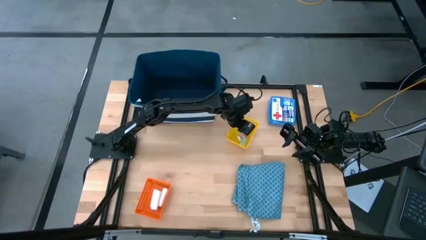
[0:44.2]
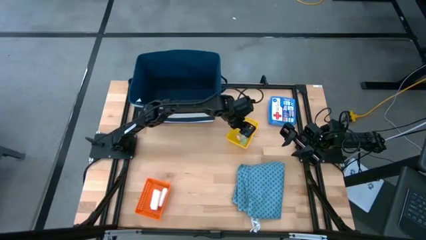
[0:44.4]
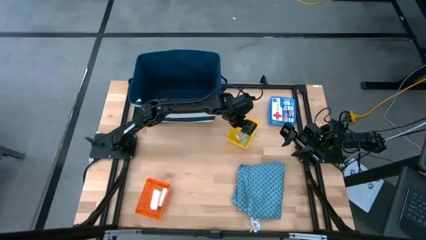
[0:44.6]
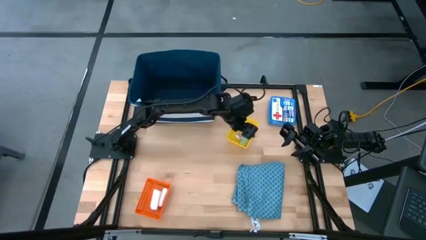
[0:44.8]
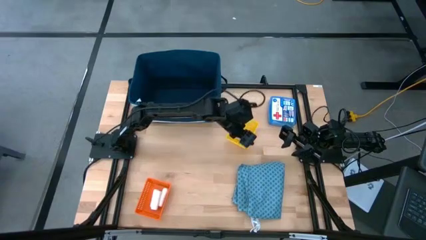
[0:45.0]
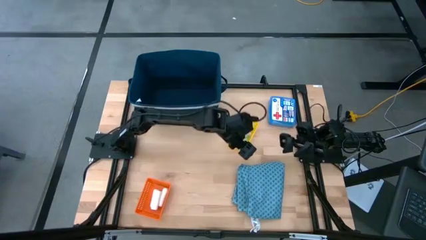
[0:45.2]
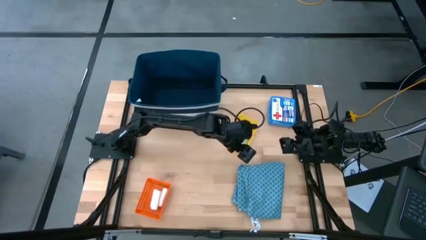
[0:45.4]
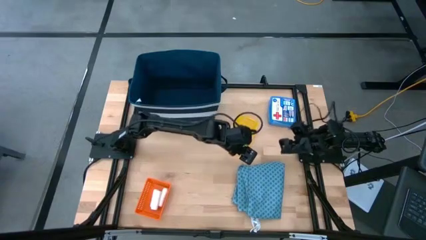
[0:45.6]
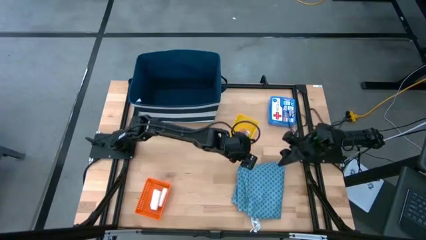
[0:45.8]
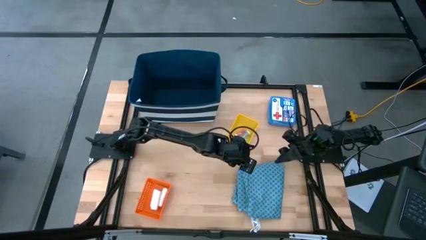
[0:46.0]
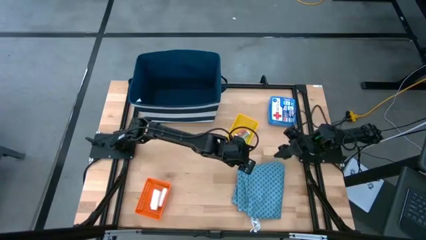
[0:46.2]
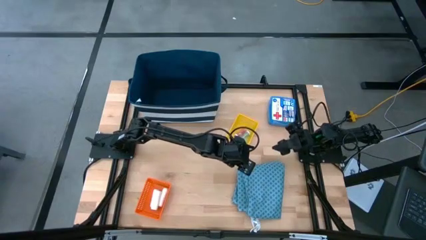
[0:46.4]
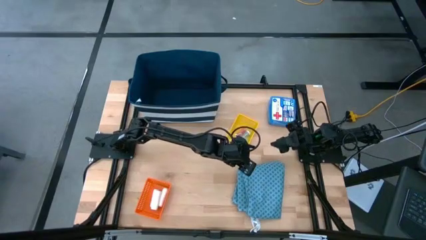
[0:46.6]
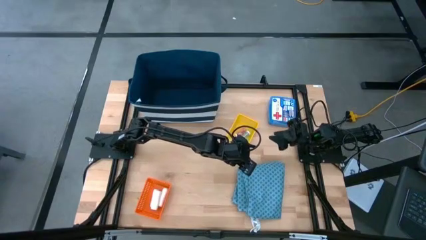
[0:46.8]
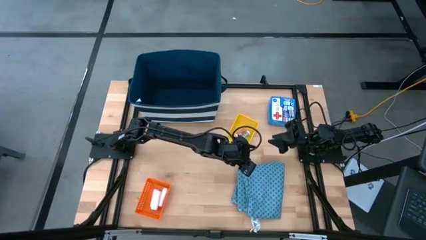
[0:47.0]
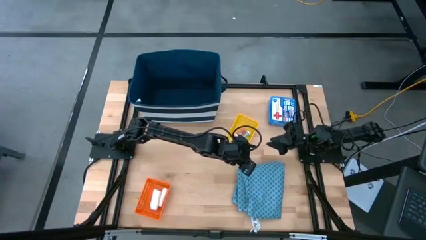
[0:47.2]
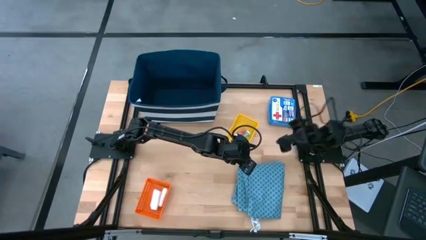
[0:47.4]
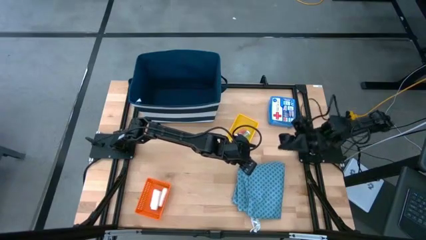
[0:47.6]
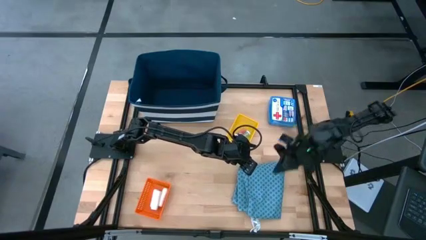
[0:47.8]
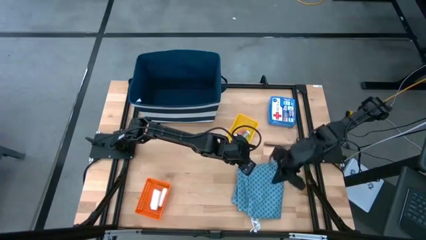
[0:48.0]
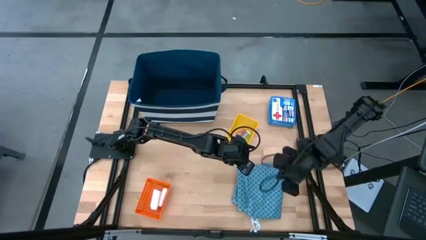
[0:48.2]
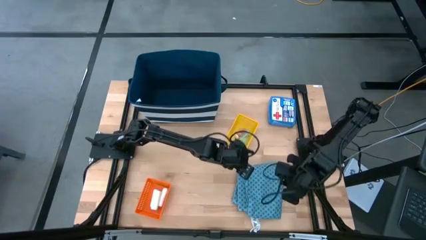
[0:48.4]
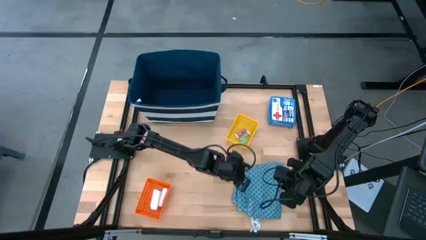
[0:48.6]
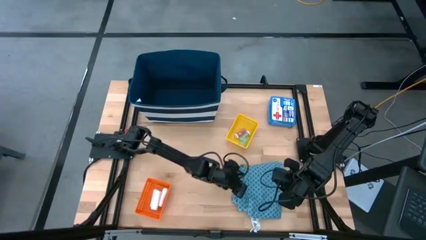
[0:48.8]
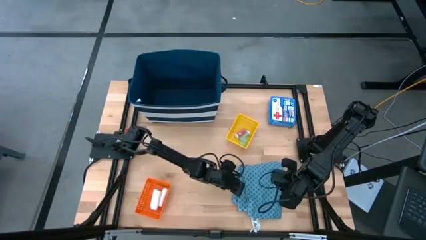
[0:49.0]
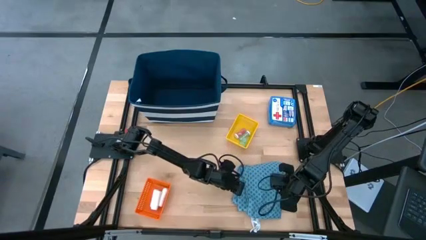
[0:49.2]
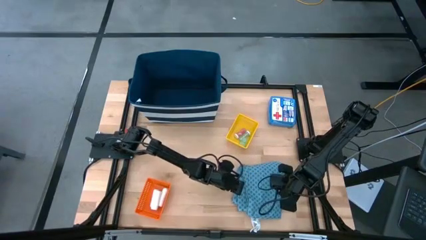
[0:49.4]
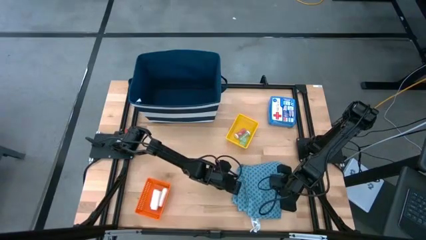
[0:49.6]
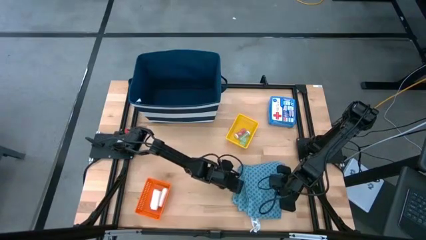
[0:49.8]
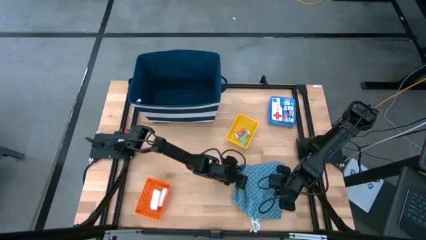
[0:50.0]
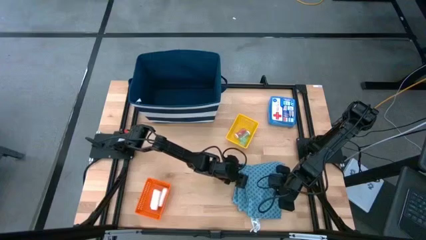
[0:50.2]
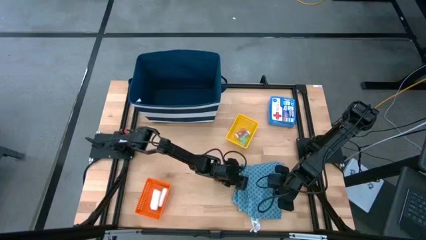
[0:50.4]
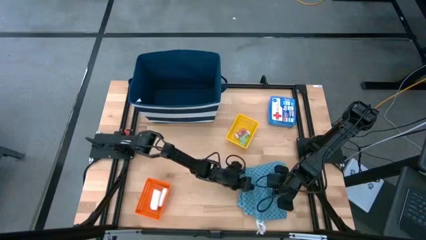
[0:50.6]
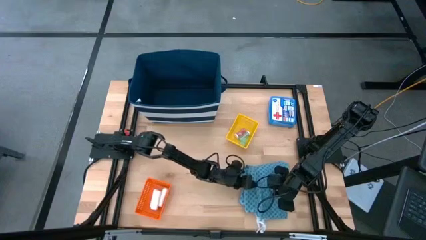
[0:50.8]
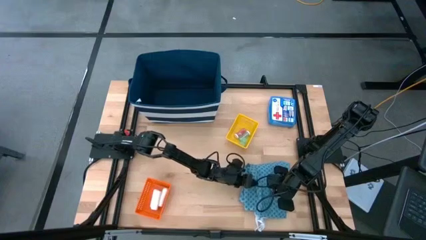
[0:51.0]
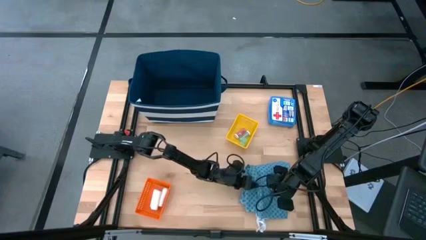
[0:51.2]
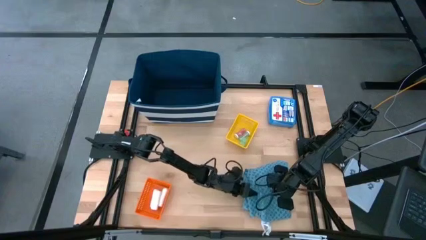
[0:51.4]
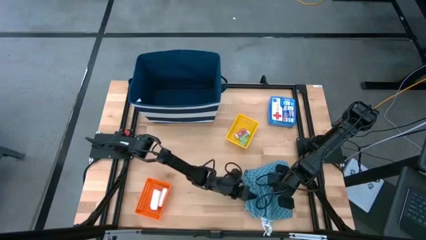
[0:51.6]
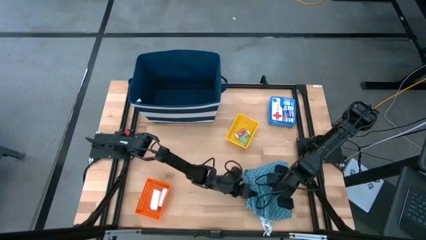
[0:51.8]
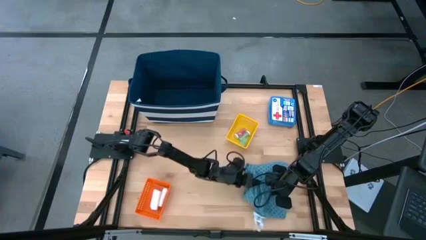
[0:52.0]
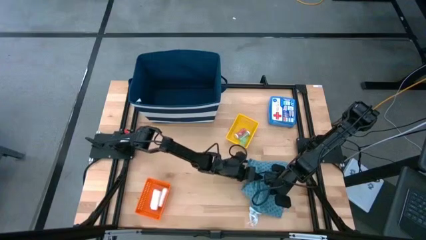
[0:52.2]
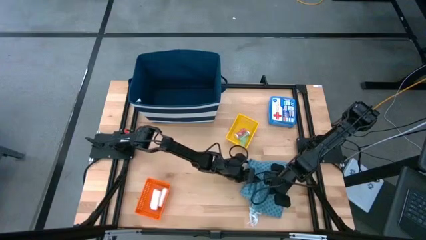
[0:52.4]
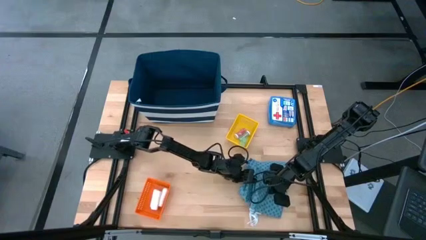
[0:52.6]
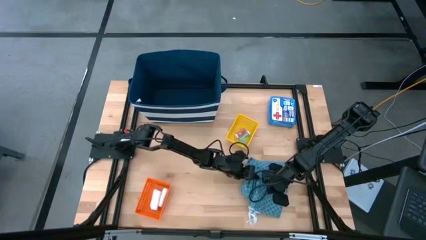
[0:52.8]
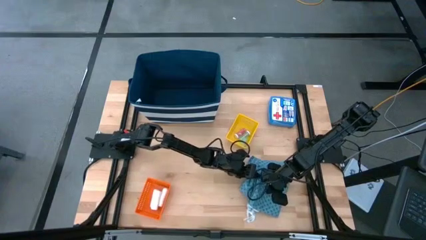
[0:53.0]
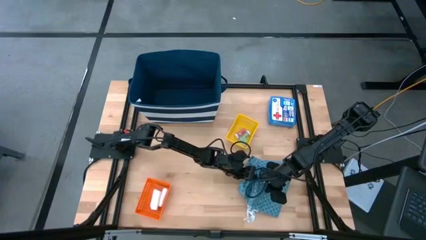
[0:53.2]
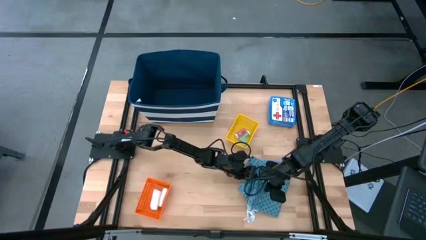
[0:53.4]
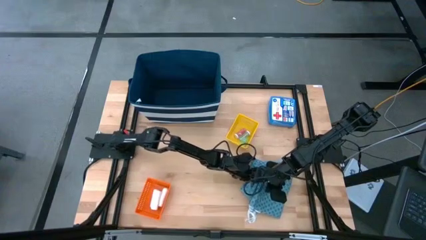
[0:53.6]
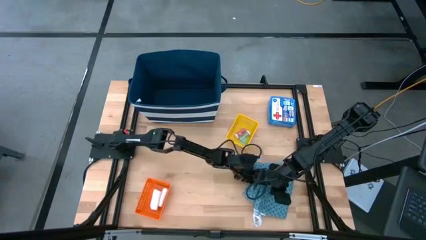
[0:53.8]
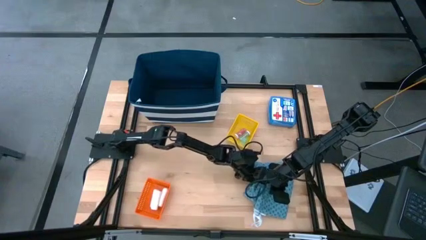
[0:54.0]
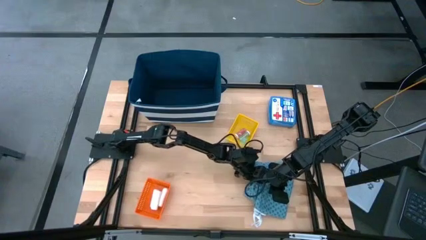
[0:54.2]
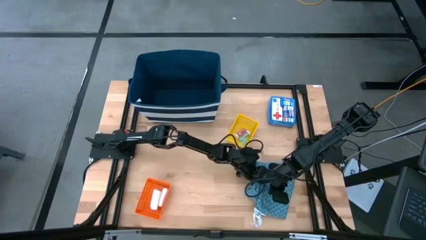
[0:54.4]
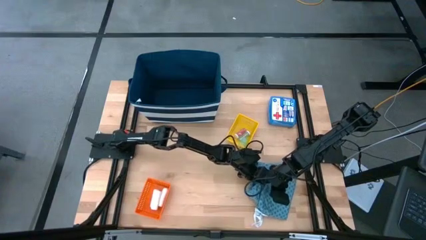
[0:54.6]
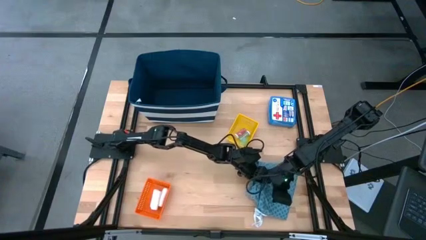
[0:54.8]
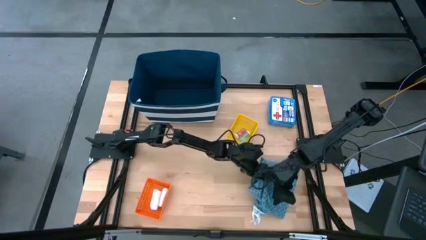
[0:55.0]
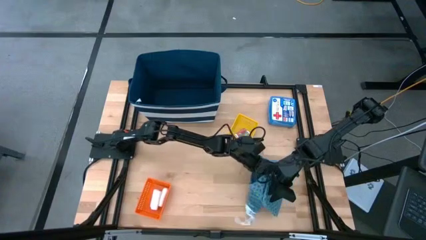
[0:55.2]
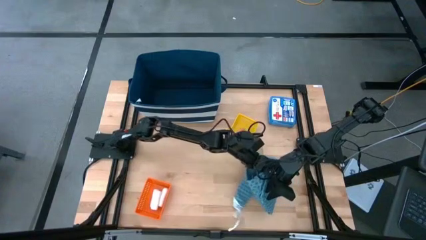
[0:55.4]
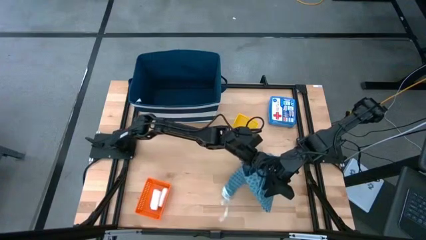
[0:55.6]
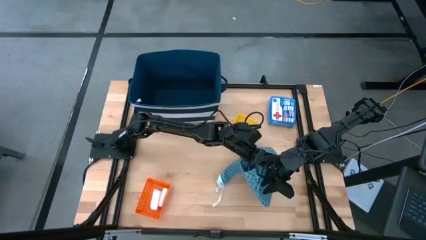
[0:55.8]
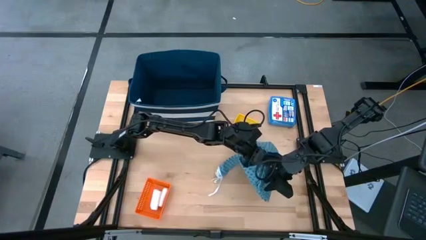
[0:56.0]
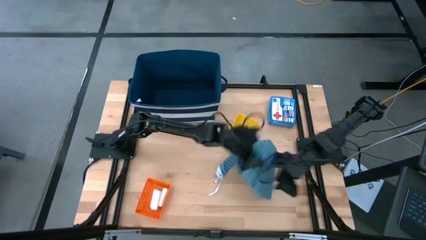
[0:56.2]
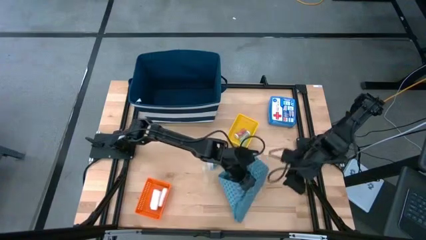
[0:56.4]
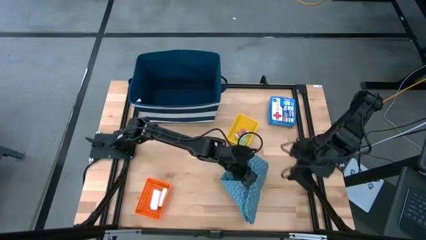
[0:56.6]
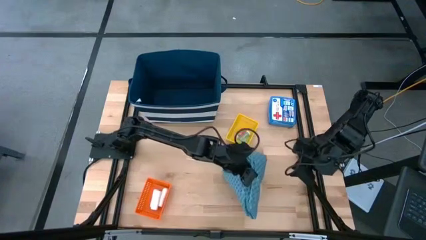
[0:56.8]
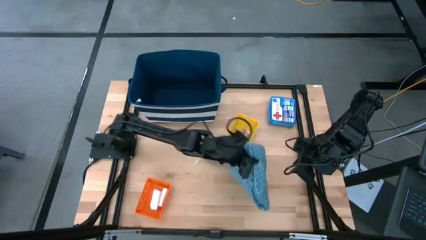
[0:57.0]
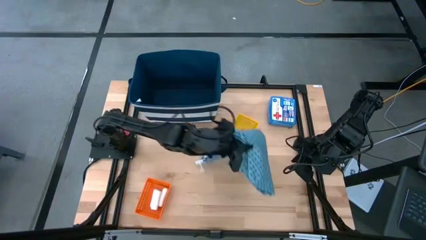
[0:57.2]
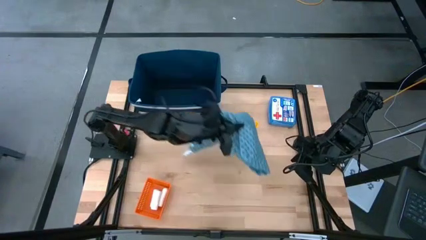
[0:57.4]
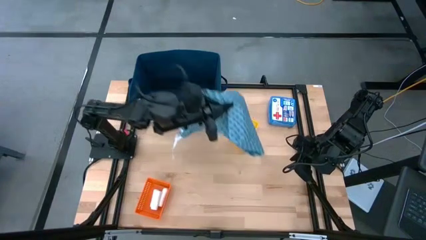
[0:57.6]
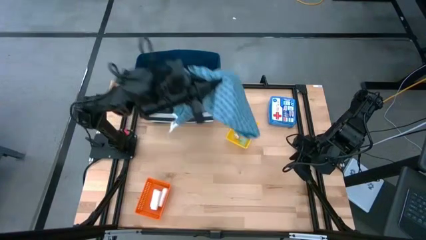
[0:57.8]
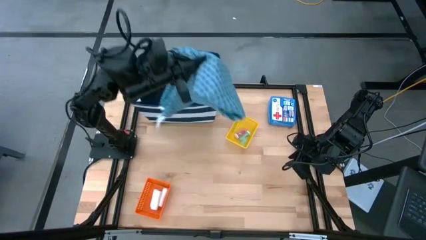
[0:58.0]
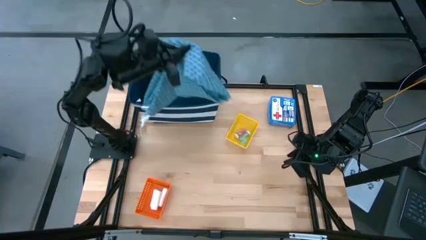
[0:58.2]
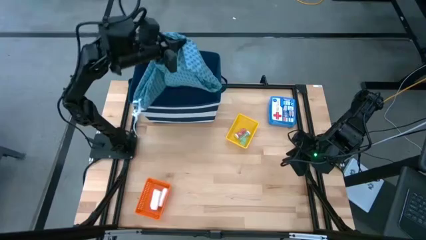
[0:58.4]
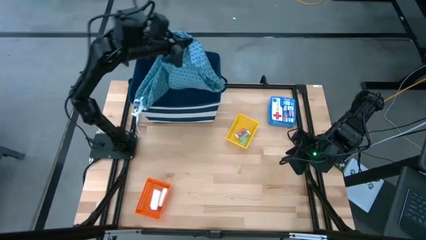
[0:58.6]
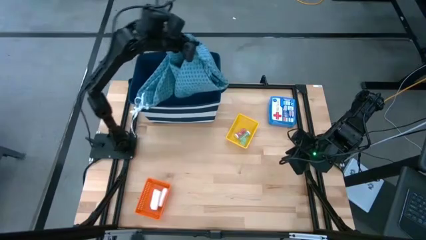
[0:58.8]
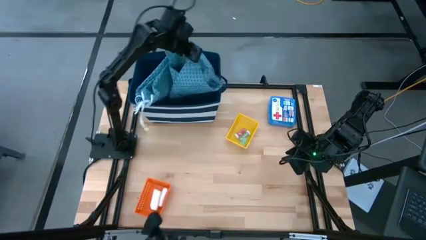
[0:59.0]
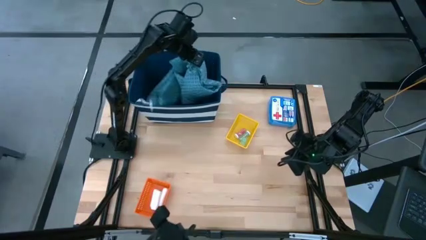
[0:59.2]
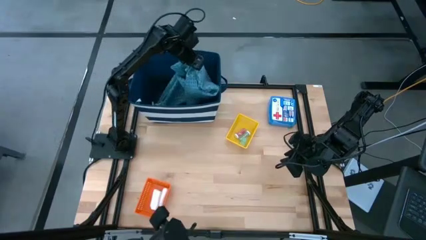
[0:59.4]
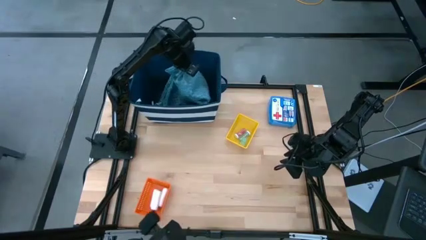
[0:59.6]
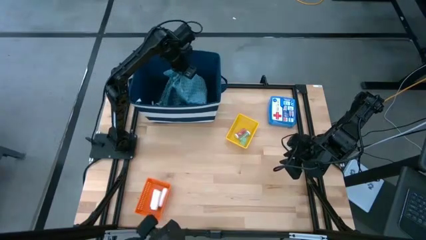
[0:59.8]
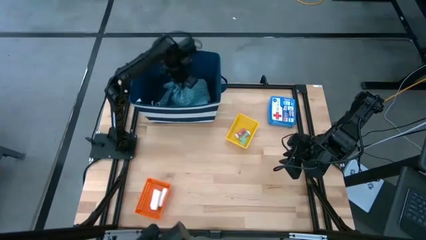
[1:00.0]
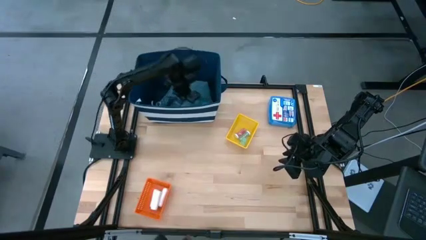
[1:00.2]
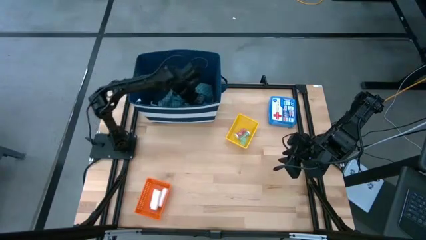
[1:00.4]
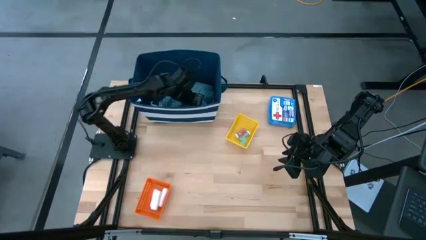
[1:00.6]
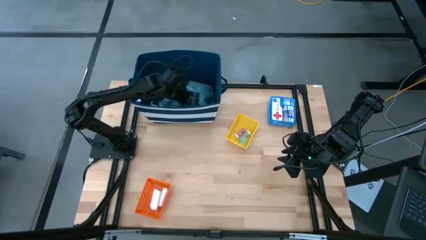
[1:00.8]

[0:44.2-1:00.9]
Task: Pick & place medical supplies in basket/bin
Put the blue gown in the blue bin
